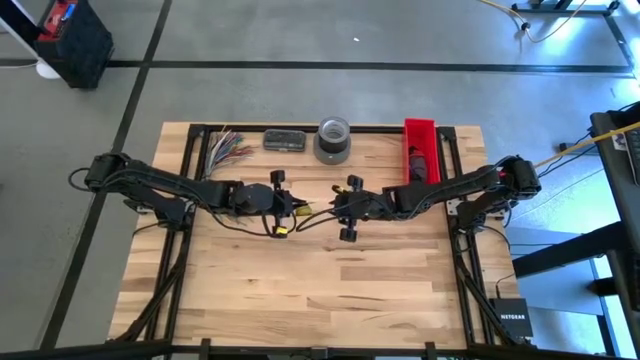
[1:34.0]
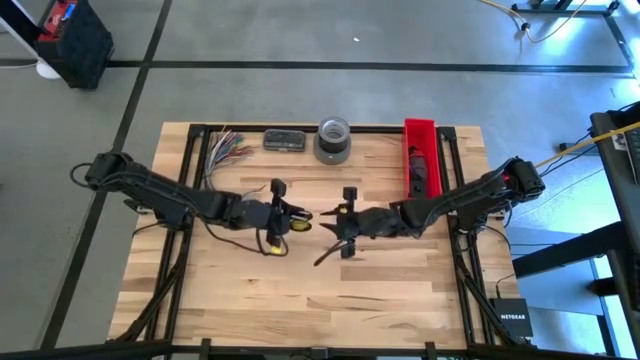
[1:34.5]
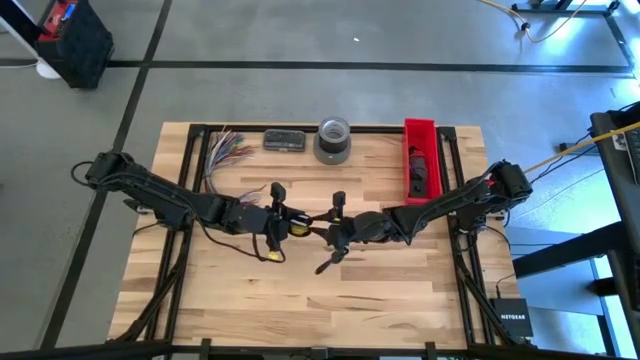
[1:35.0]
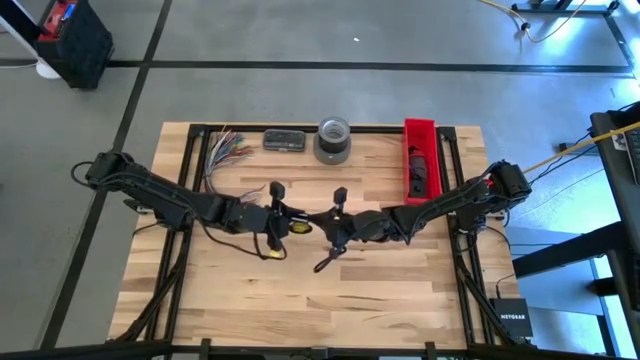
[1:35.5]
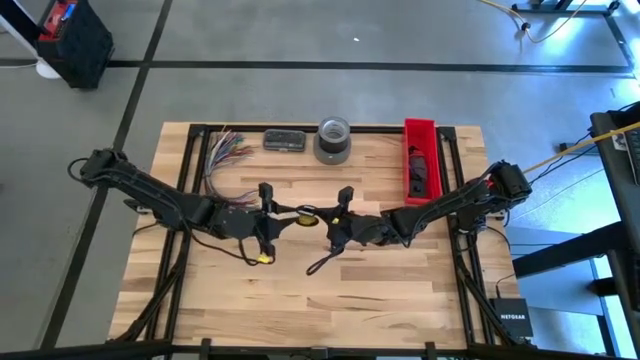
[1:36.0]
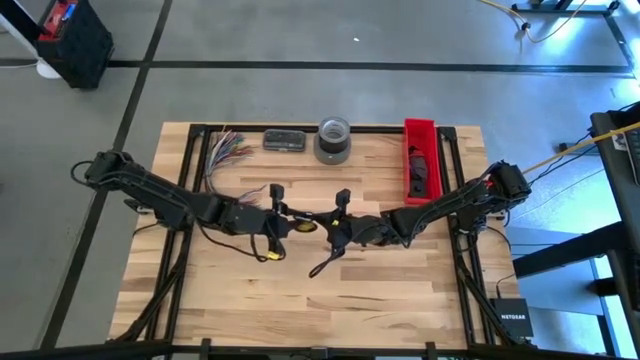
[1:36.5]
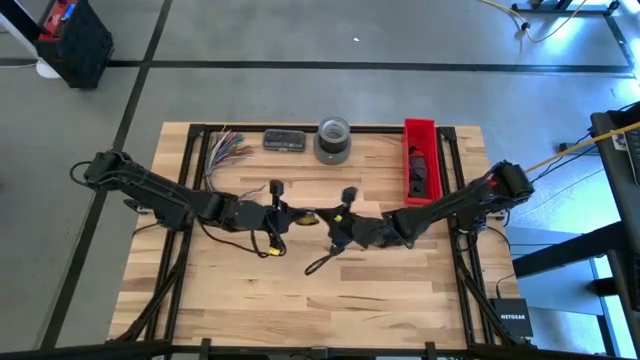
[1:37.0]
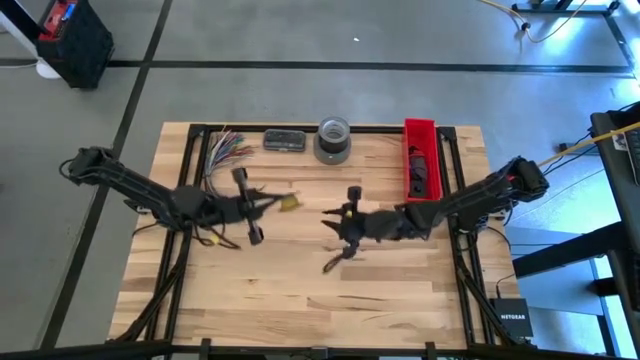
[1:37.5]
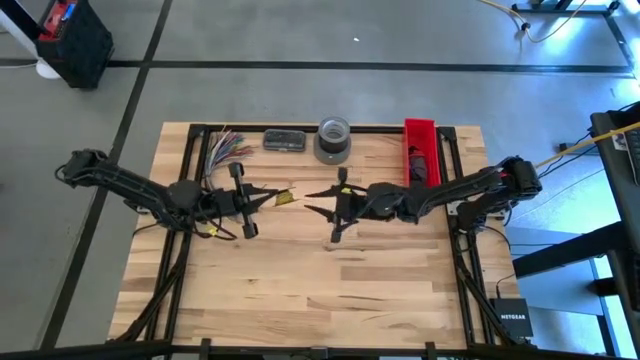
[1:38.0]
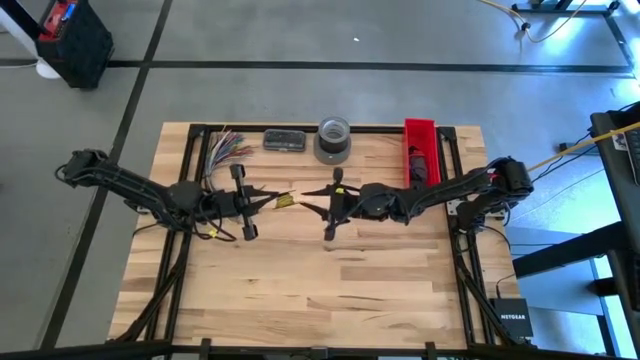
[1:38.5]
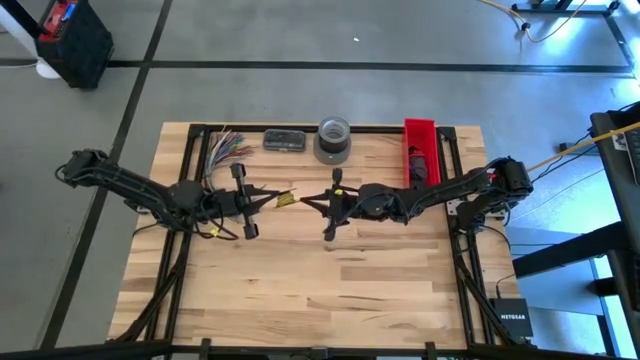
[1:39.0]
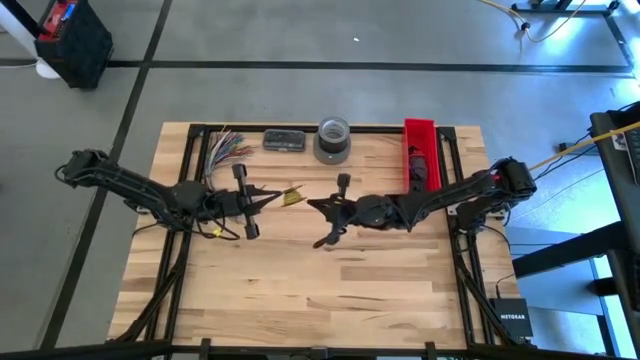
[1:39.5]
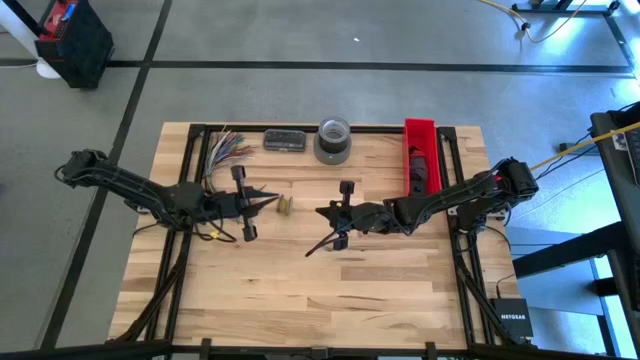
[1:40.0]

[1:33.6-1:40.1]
Task: Coil cords
Uncoil the yellow wire from the spool

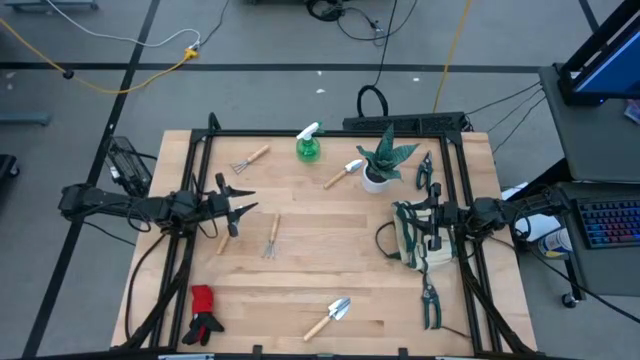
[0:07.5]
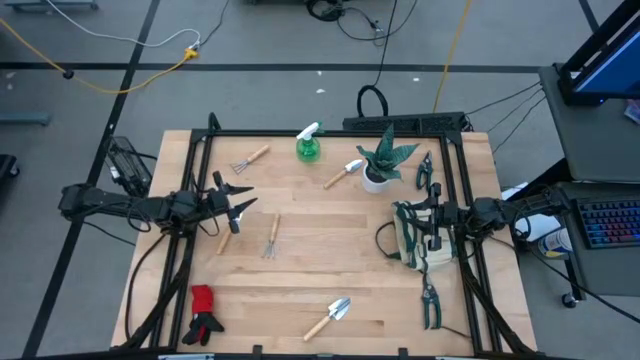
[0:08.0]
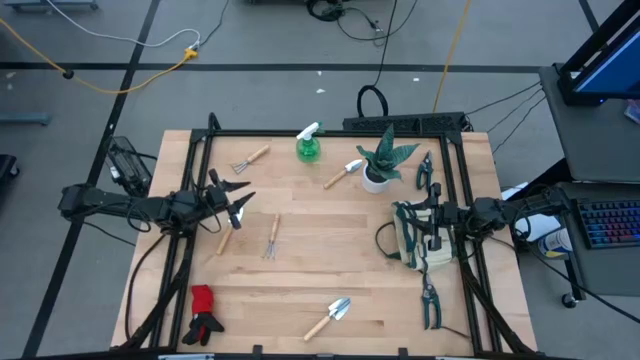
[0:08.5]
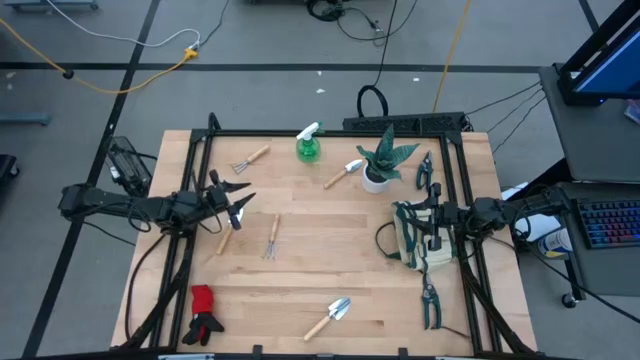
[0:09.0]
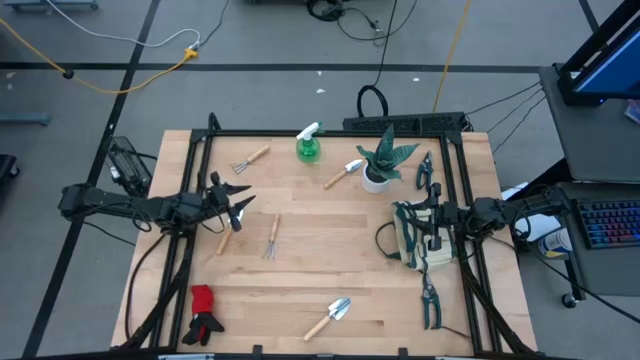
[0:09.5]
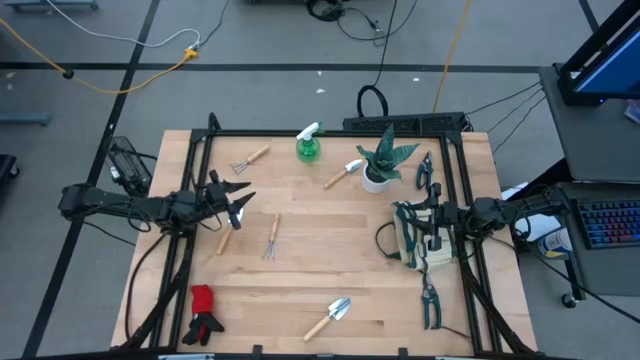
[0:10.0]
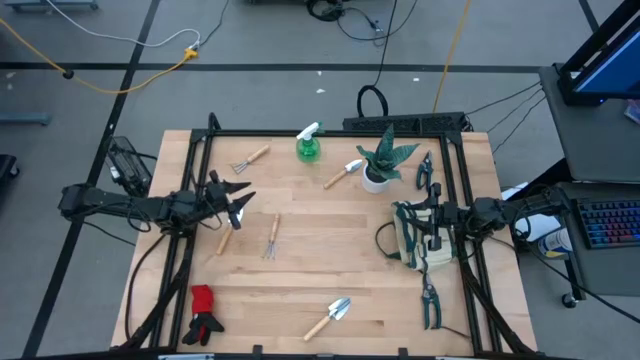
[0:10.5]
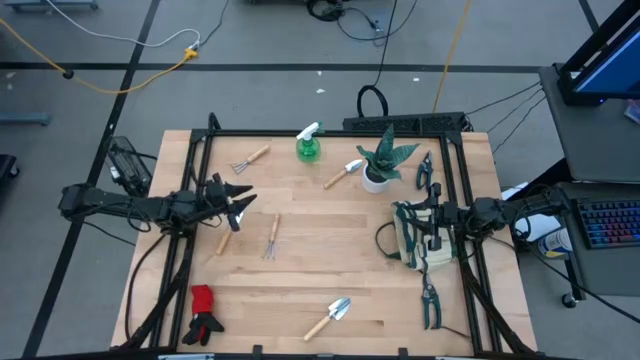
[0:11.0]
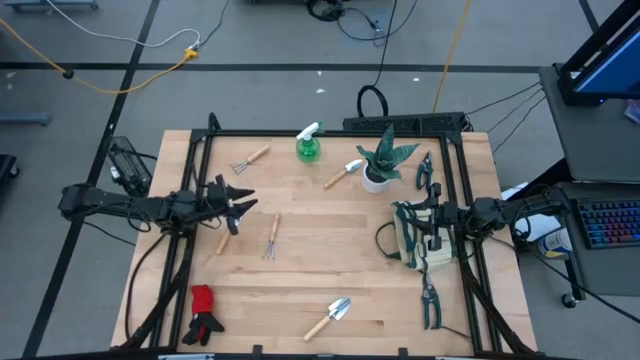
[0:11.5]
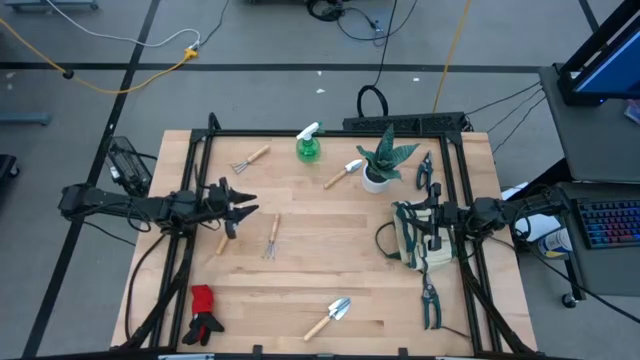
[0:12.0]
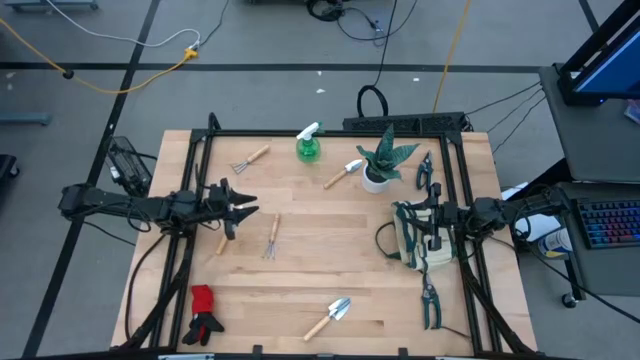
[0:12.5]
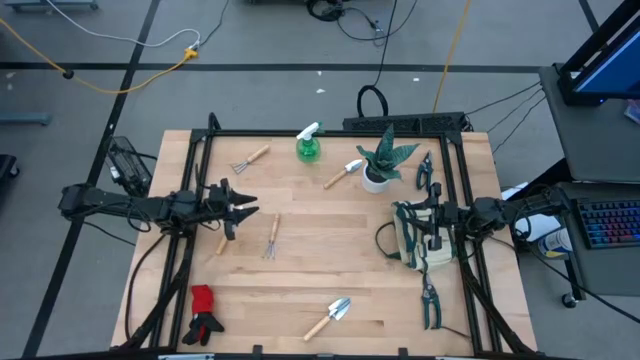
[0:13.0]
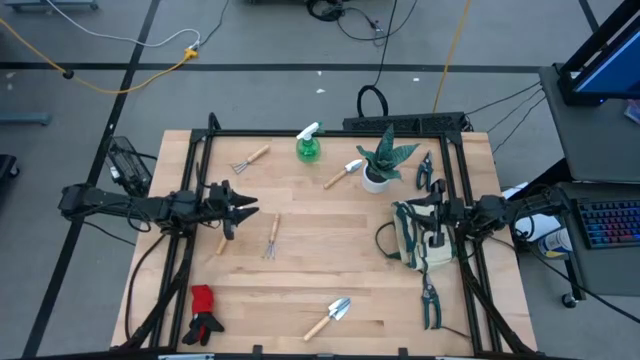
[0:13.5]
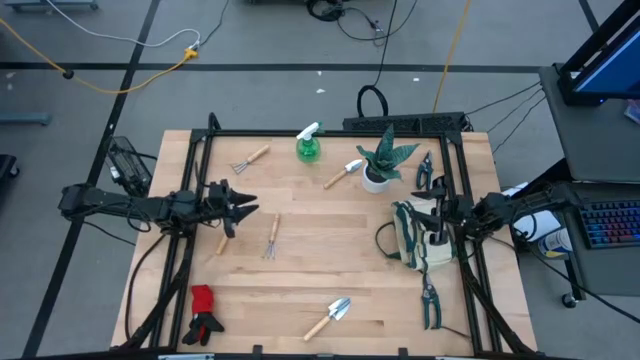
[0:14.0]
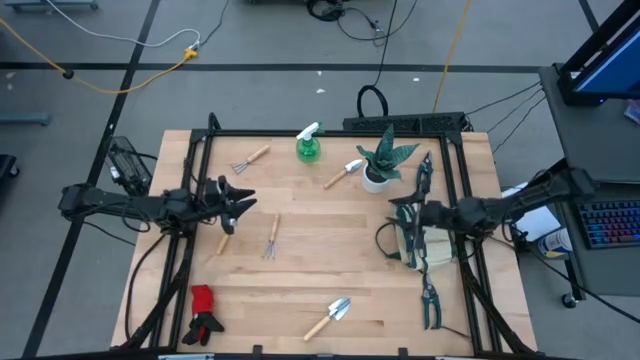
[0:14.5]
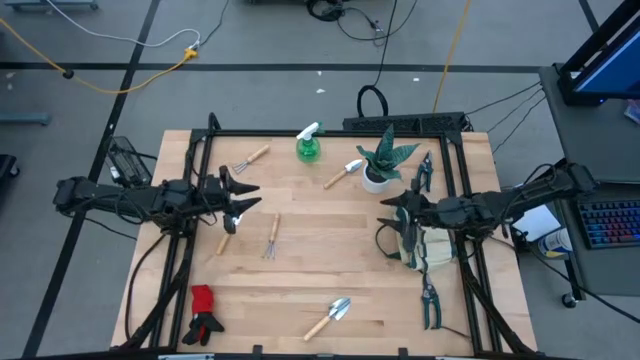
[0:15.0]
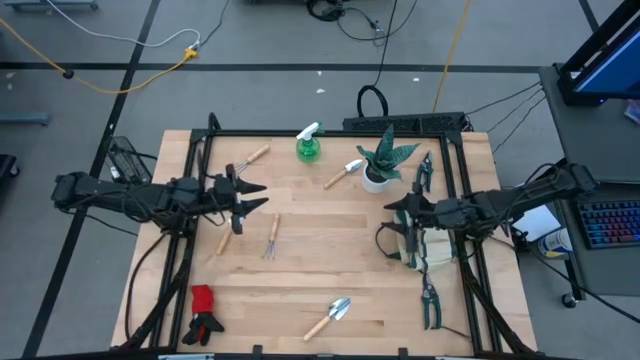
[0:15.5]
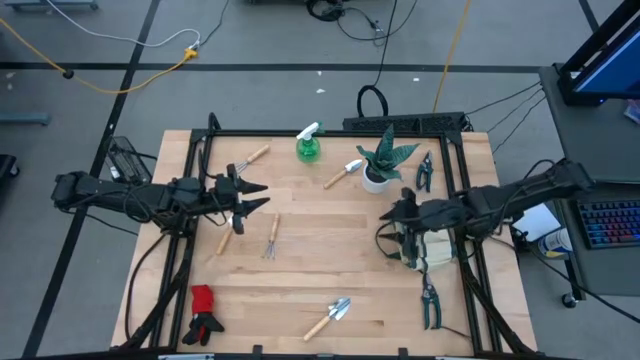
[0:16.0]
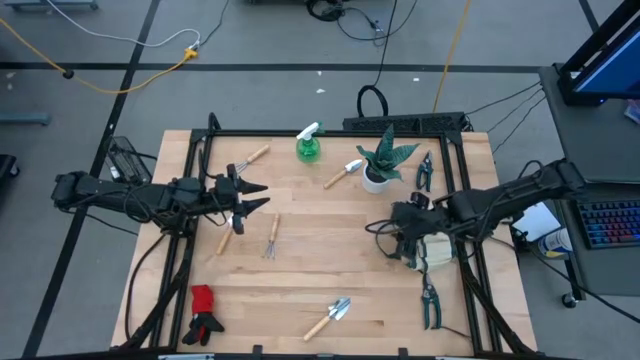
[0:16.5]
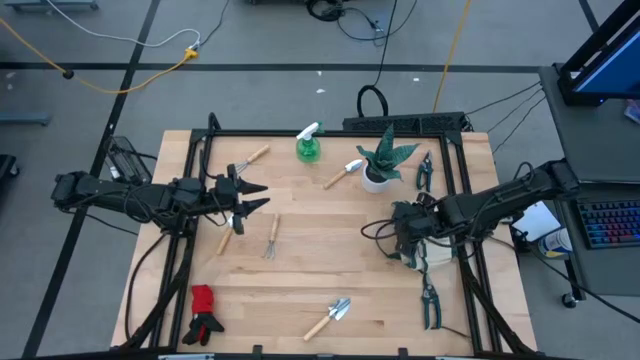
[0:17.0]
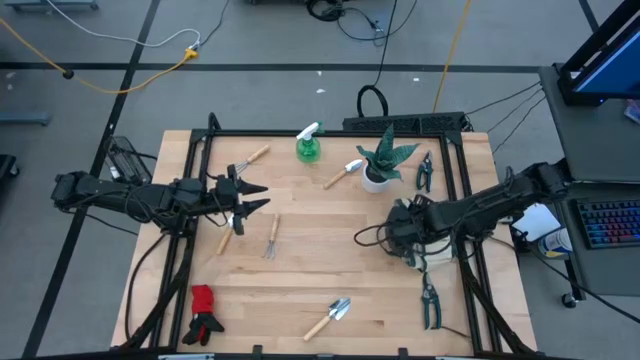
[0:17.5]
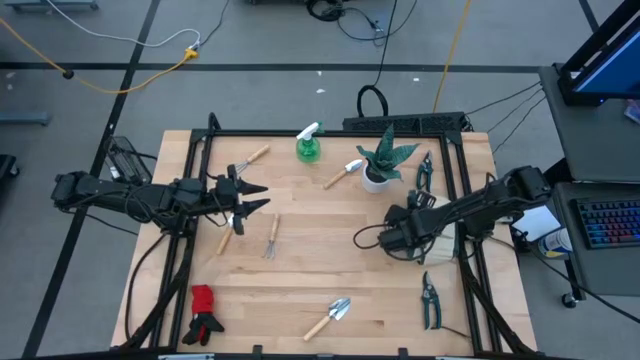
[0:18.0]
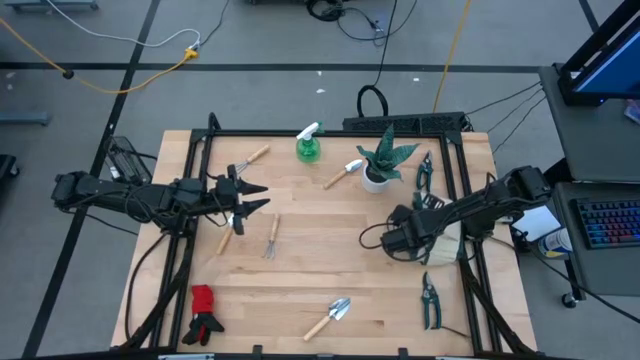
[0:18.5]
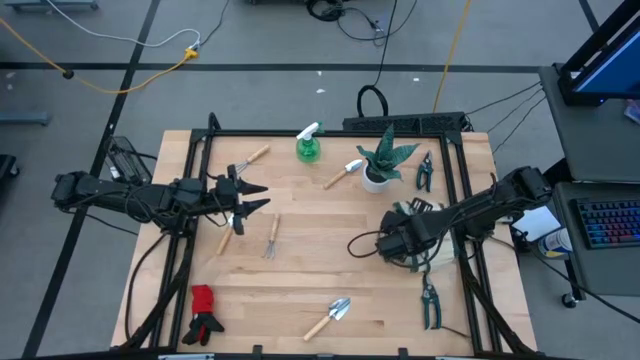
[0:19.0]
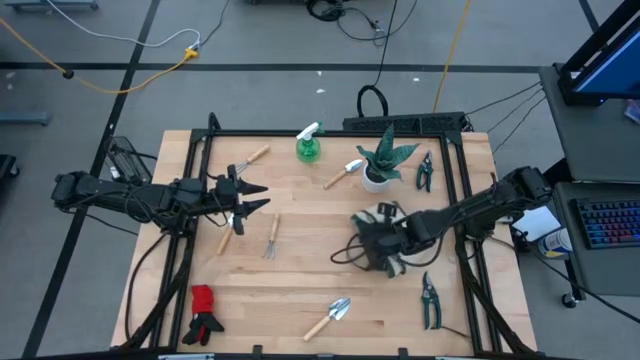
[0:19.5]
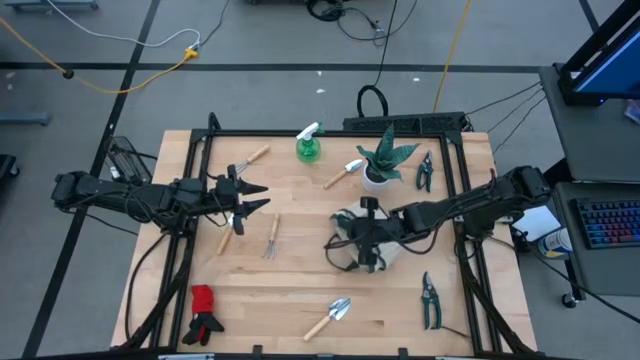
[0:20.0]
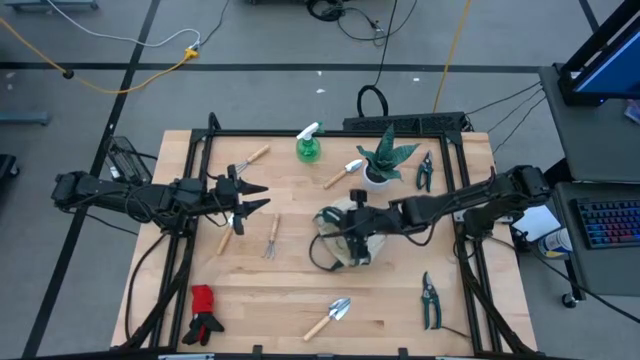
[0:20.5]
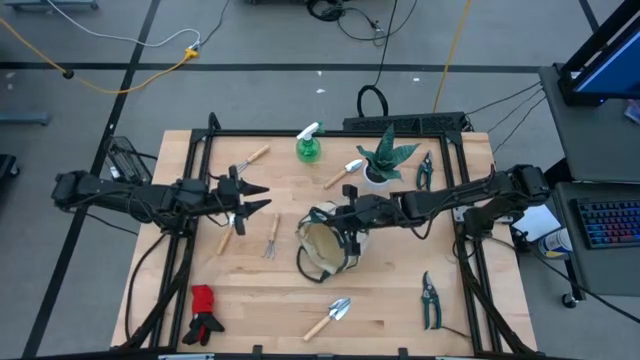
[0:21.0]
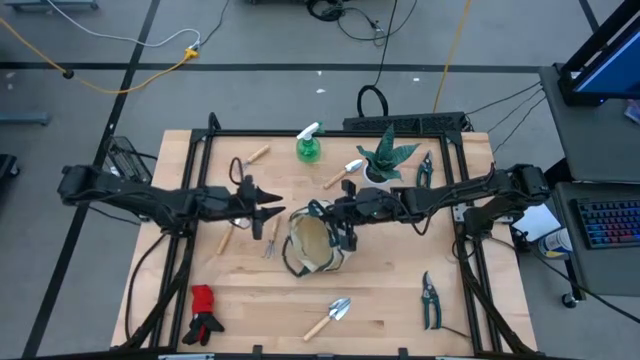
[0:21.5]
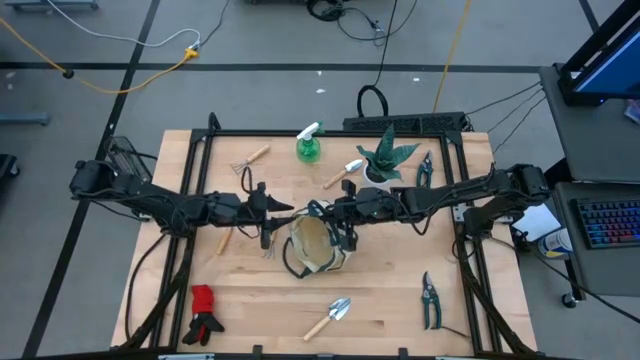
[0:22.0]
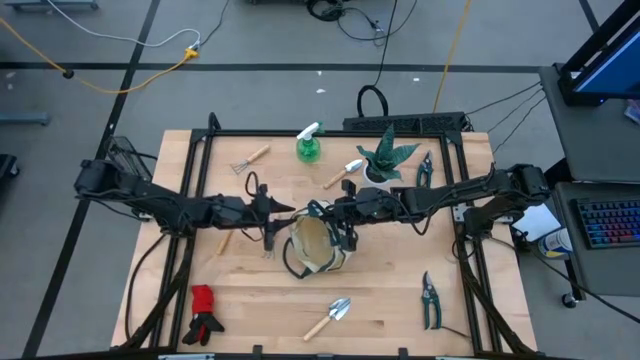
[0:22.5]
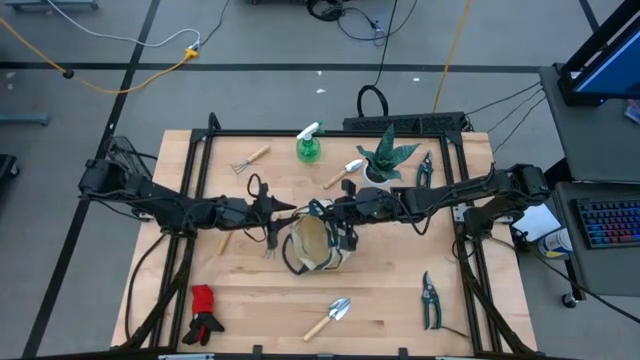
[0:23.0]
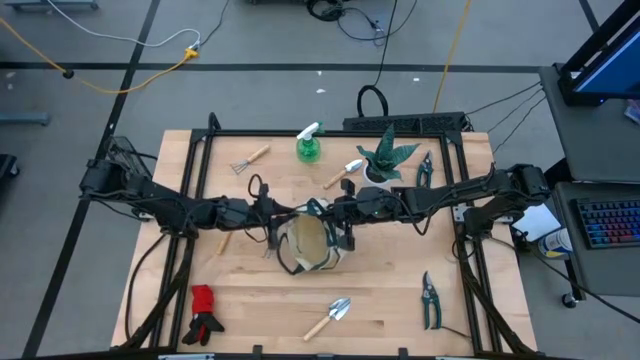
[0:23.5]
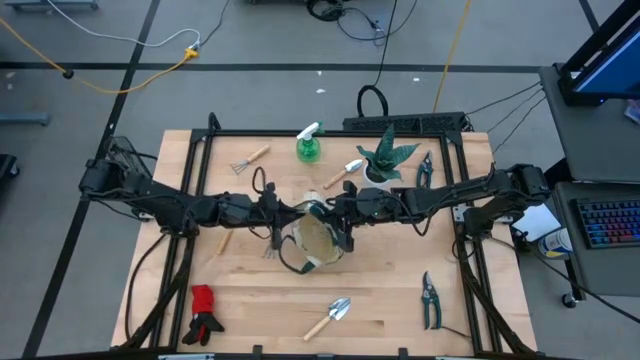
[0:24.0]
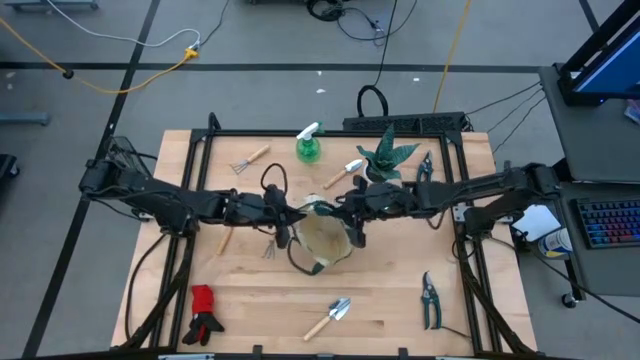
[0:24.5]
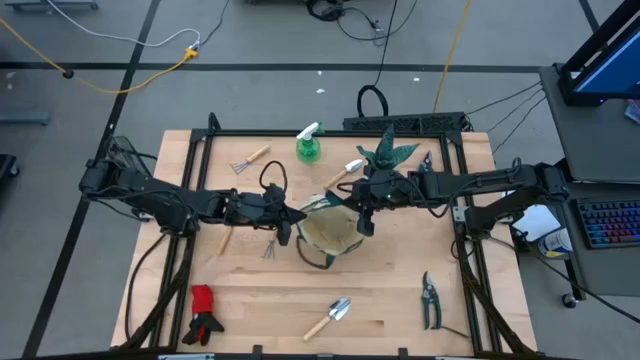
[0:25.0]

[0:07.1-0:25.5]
Task: Pick & Place Garden tools in Gardening bag
Prepare the gardening bag
